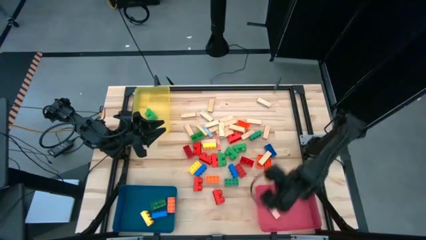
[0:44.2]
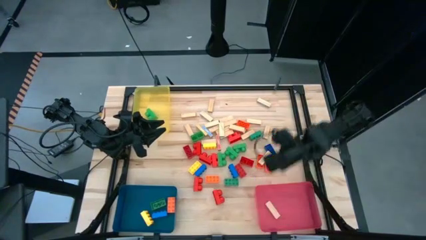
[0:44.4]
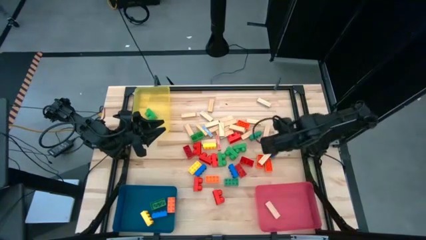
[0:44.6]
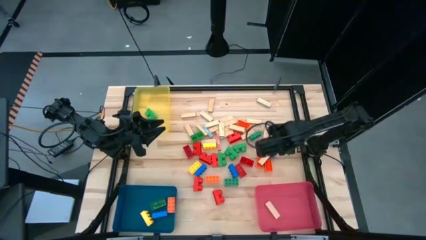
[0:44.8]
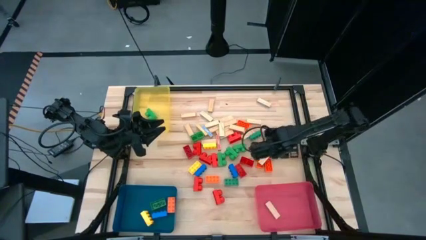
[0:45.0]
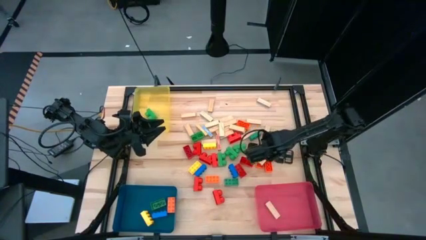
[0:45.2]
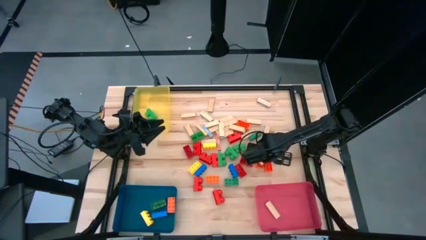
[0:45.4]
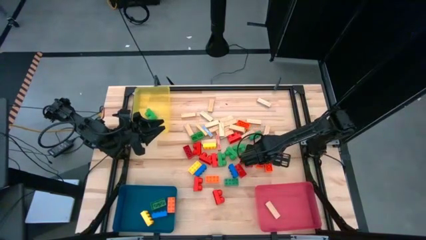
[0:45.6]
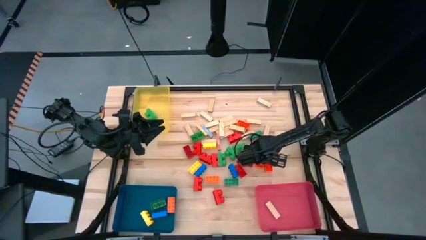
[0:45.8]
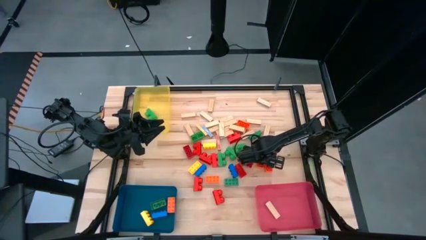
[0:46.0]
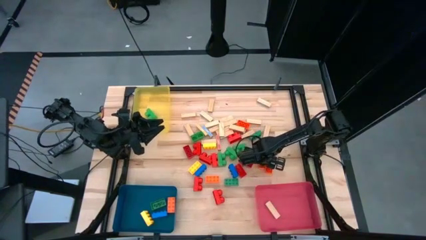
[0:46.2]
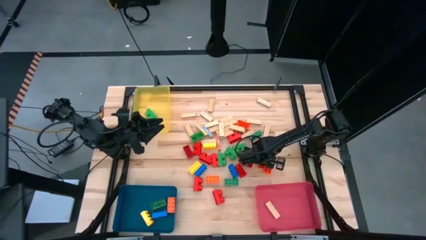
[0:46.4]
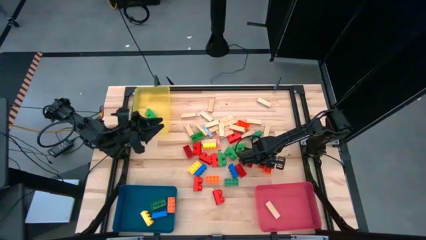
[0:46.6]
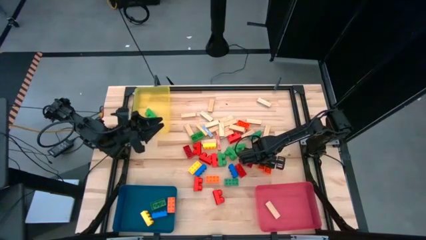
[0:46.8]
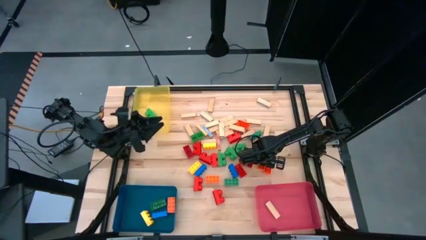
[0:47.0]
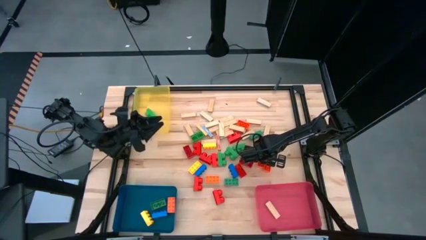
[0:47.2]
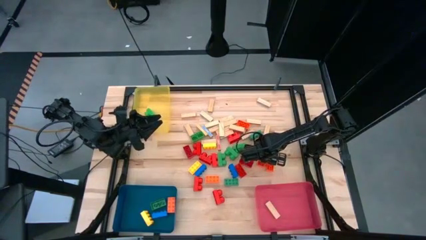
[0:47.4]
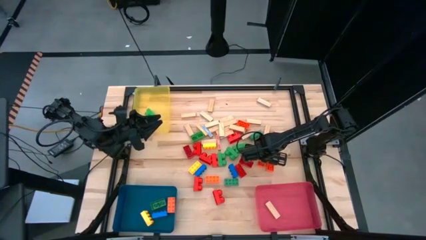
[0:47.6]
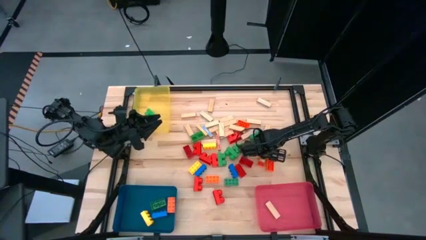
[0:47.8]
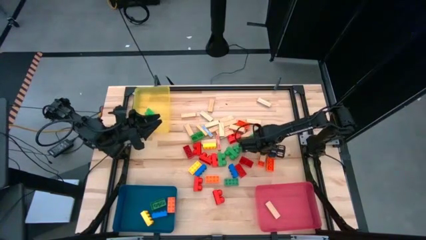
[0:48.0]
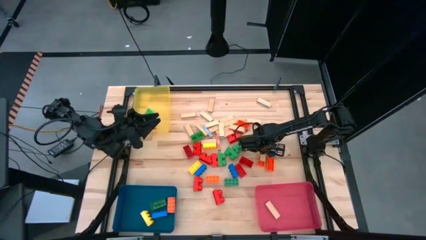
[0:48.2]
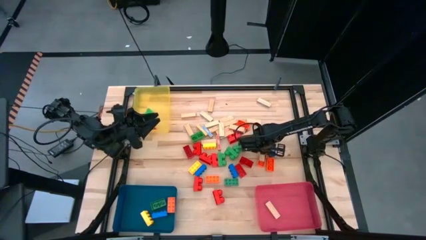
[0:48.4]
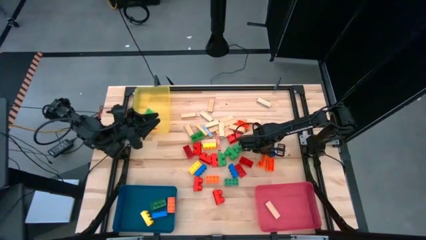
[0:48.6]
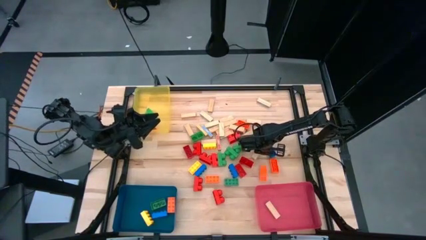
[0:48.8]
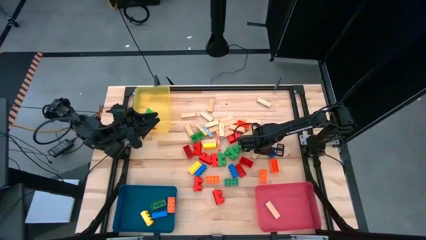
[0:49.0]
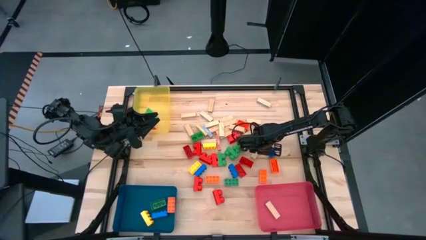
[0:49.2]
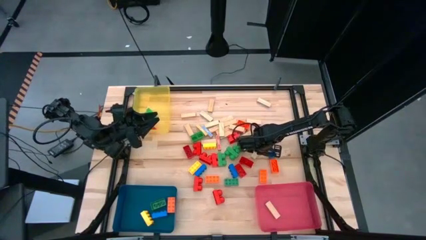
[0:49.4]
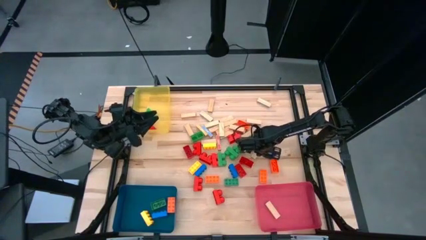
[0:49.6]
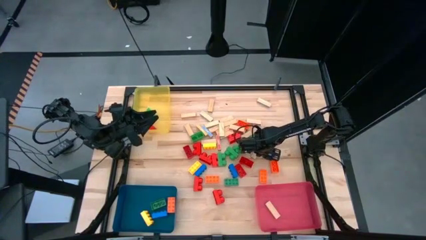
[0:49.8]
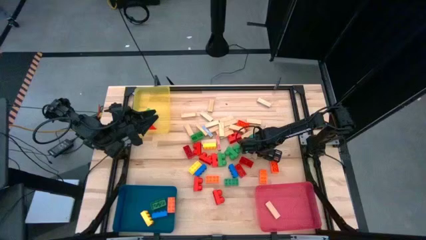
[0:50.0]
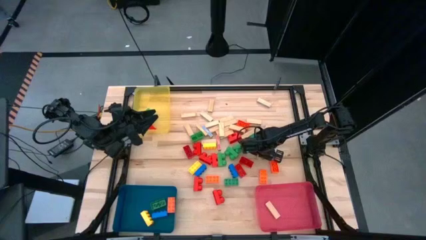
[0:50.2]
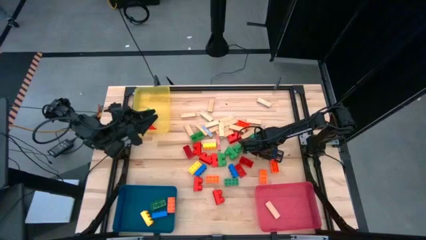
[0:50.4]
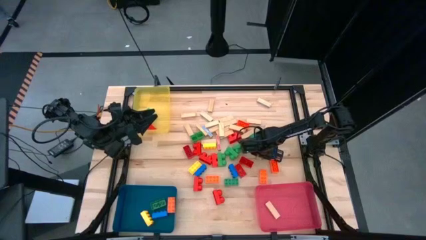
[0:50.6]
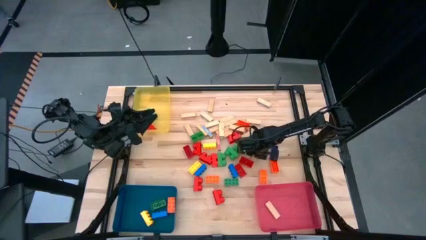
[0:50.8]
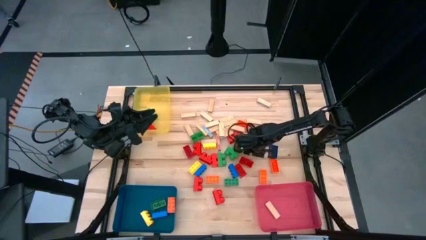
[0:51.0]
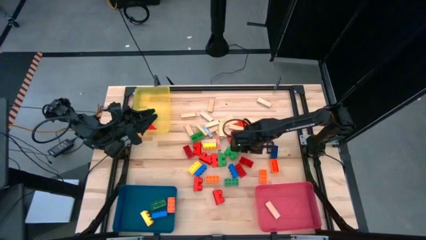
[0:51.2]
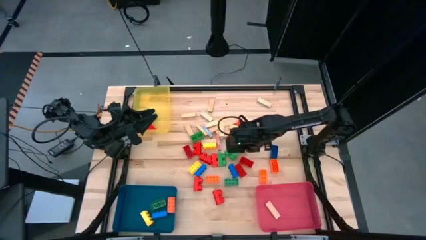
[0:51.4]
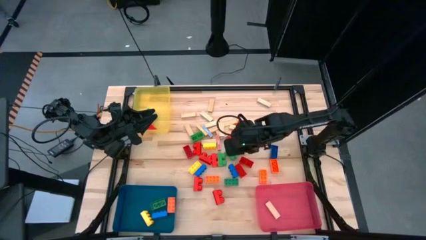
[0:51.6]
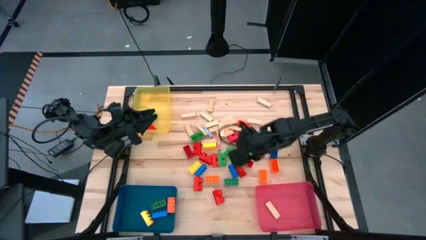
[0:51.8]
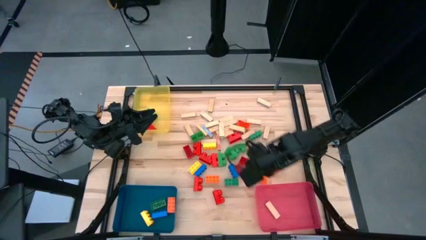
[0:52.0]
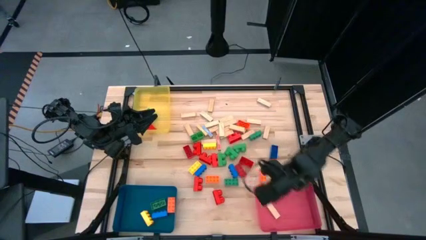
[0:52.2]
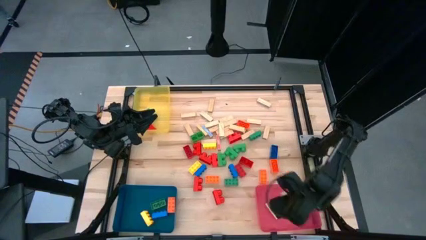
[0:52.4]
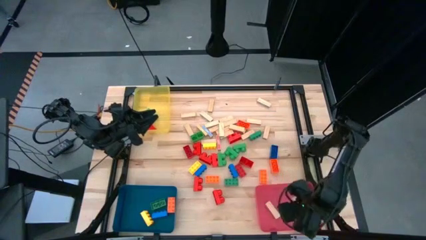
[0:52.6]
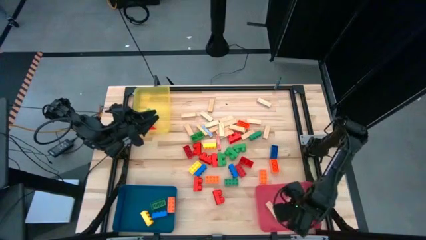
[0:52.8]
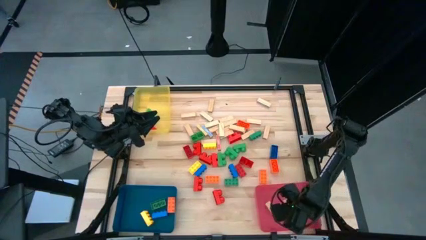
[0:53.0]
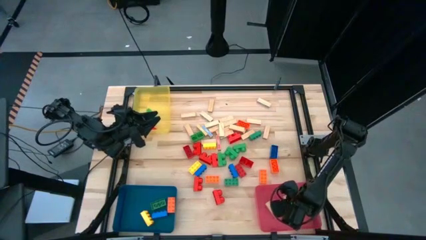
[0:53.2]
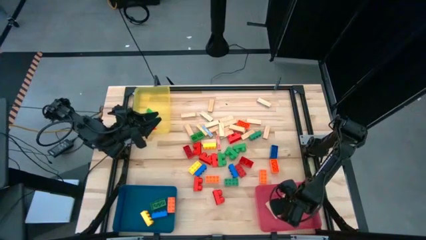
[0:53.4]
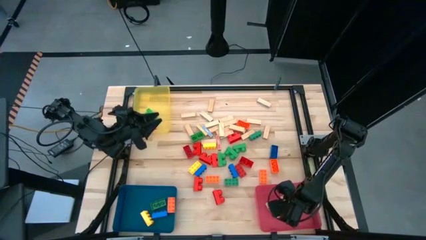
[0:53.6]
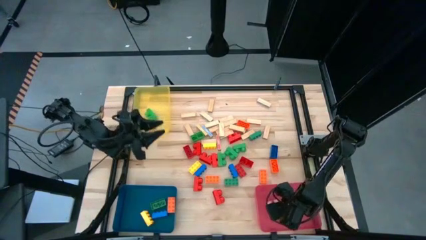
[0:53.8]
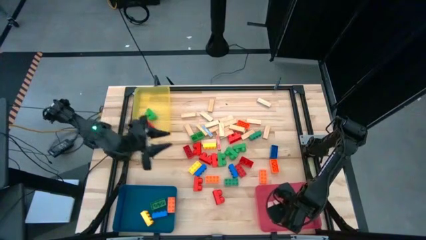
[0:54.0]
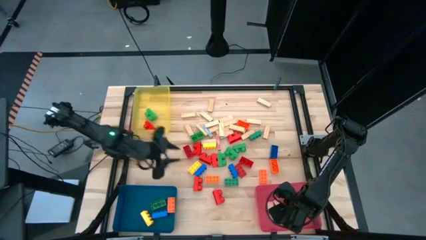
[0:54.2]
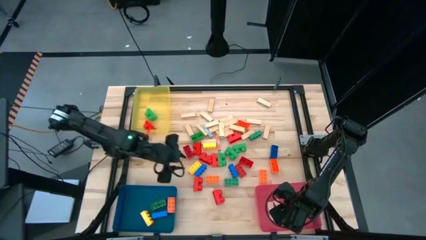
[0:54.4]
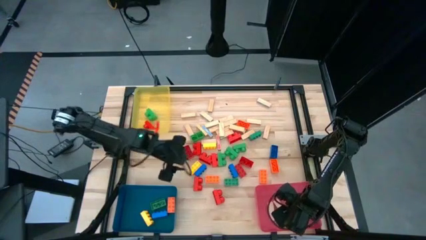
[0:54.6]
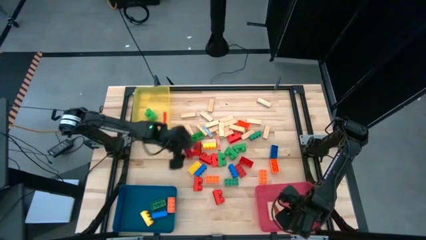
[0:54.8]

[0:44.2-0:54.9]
Task: Sort blocks by size
Put the wooden block into the red bin

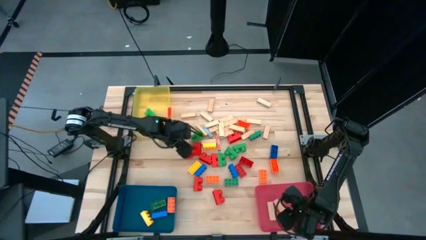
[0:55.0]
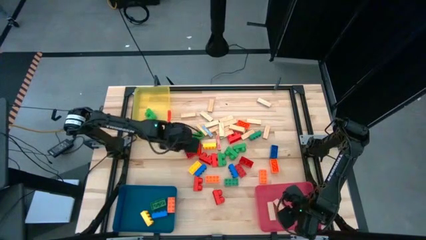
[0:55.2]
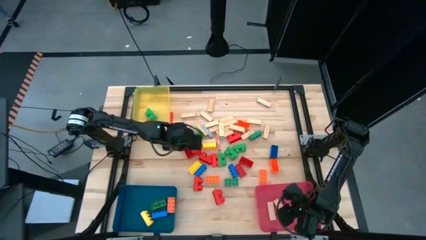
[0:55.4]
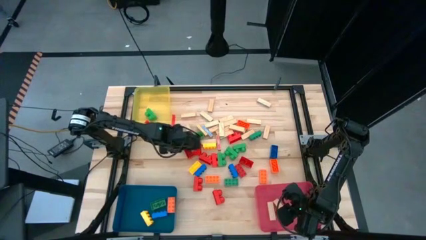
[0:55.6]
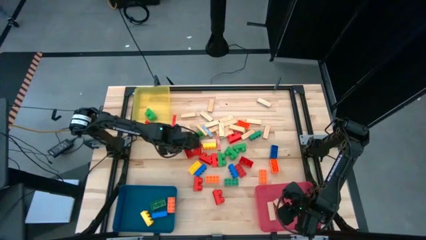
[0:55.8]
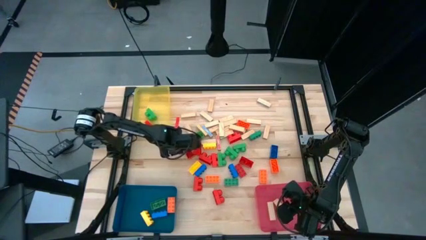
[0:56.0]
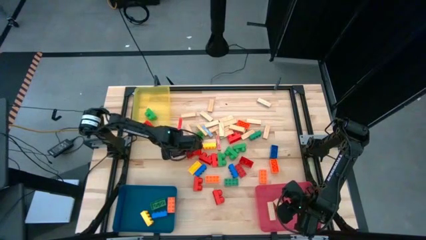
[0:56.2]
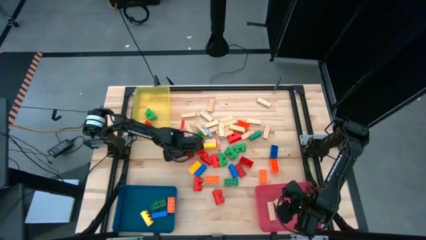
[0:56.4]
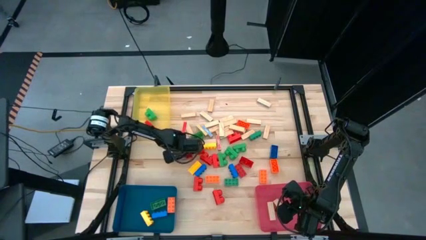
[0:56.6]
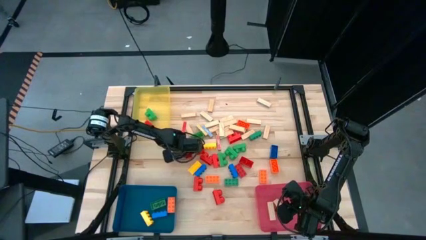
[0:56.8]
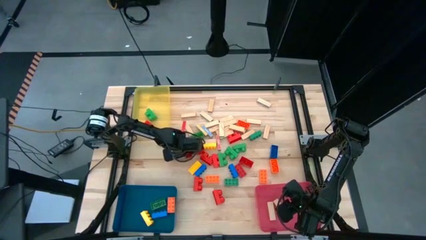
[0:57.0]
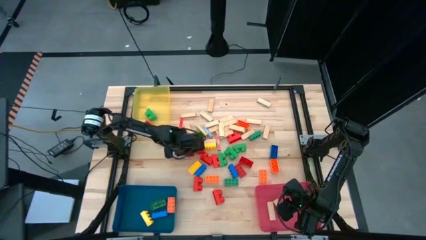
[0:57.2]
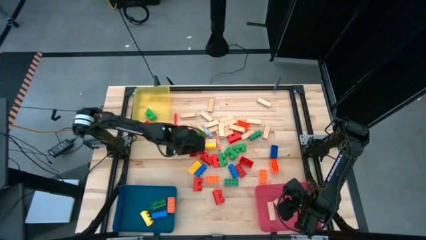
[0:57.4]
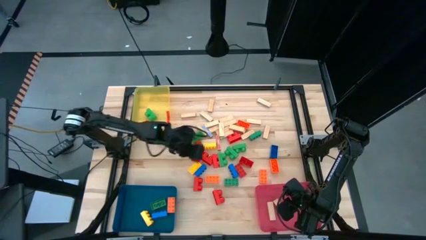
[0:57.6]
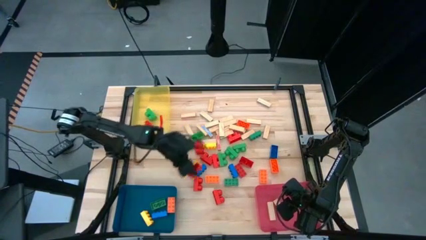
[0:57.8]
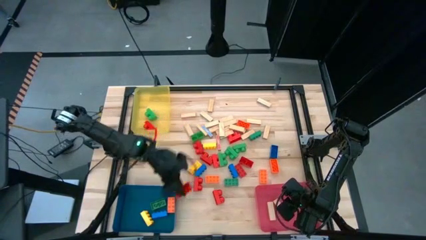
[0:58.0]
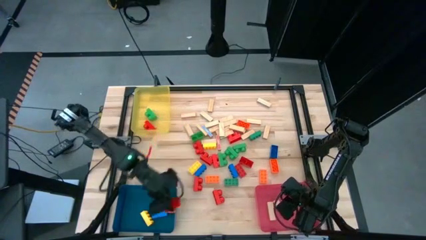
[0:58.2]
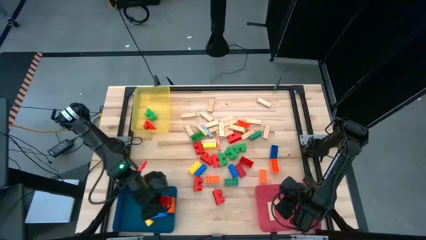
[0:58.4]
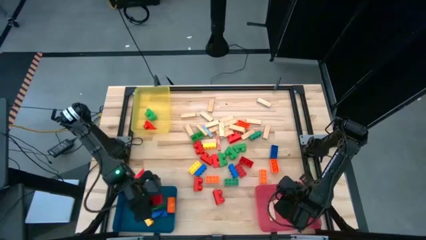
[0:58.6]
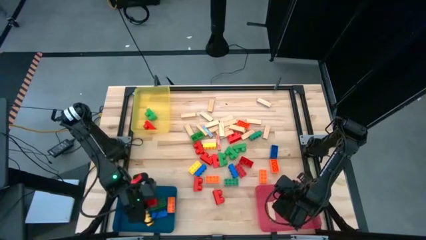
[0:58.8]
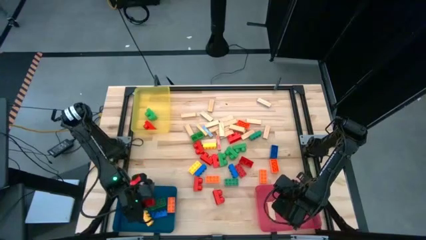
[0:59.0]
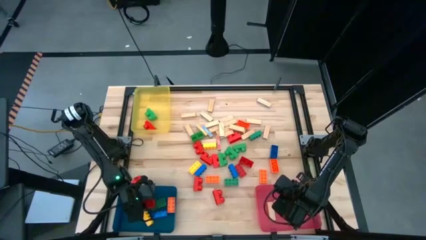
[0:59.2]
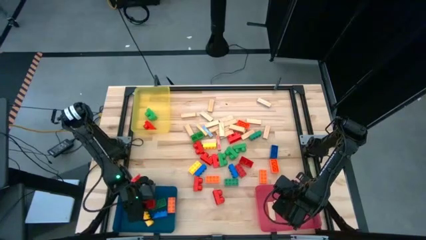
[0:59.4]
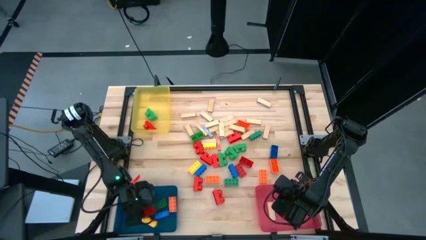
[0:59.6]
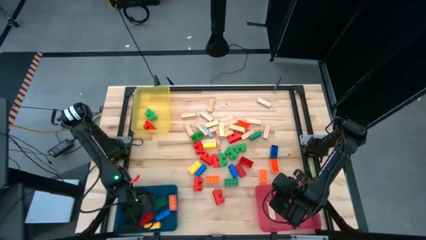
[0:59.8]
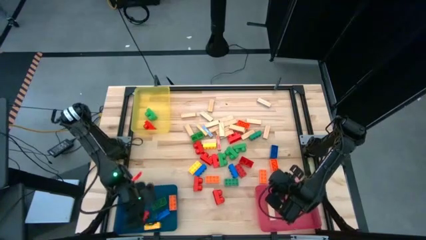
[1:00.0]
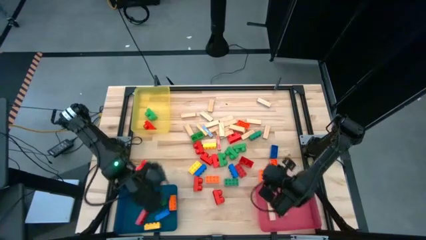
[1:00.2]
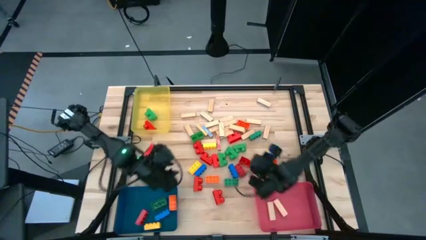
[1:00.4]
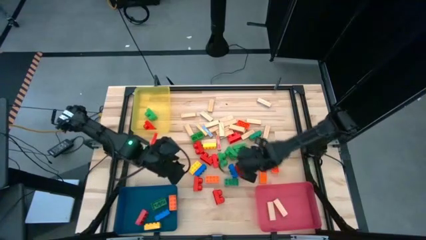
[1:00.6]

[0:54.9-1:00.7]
Put the red game piece into the blue bin
